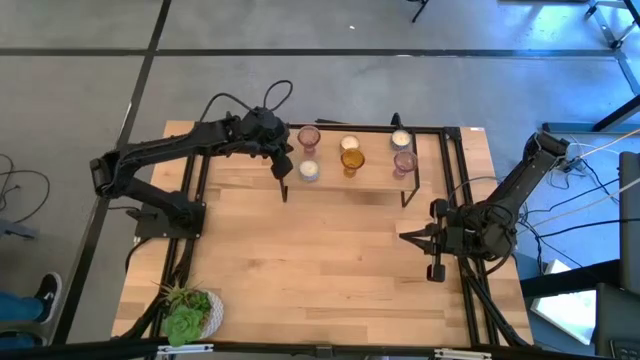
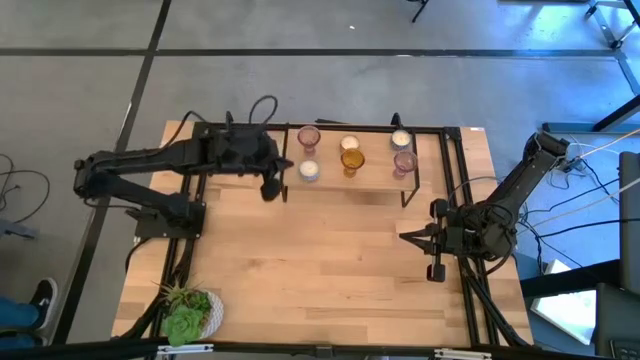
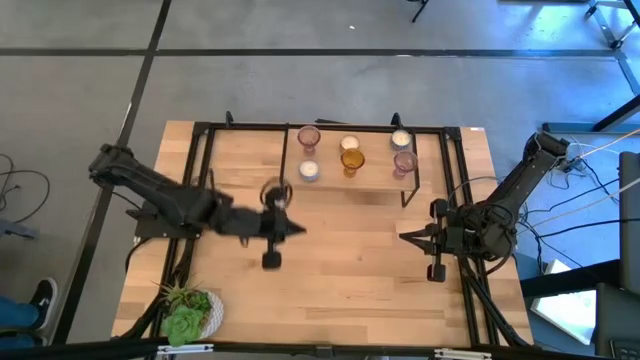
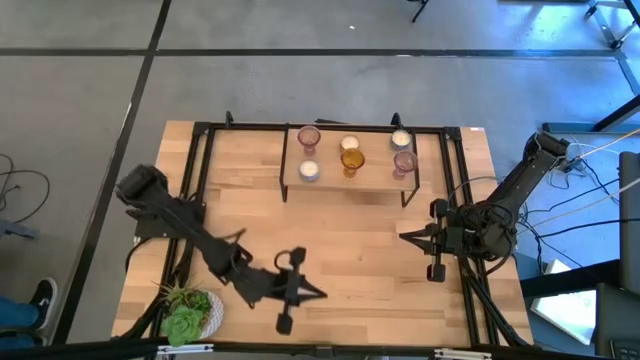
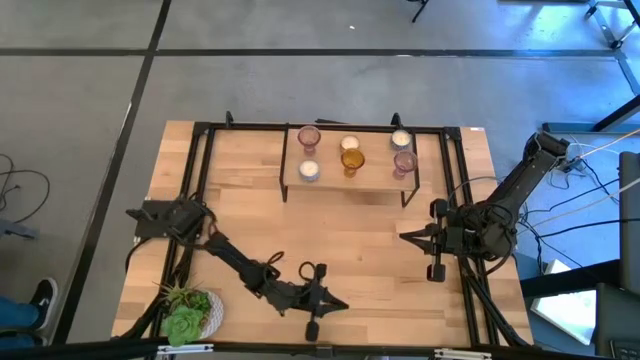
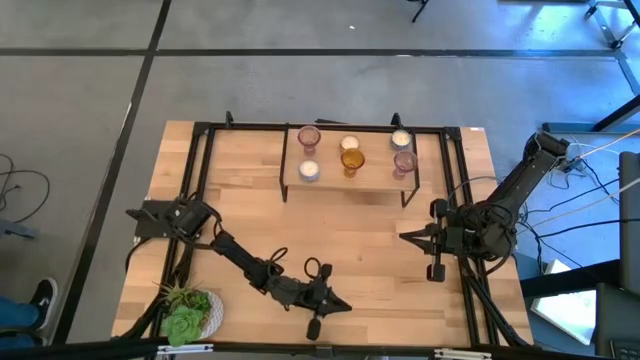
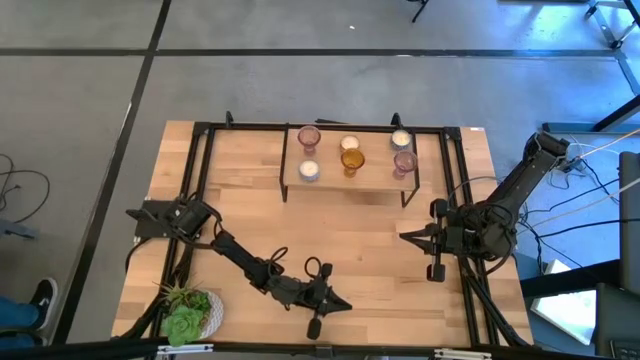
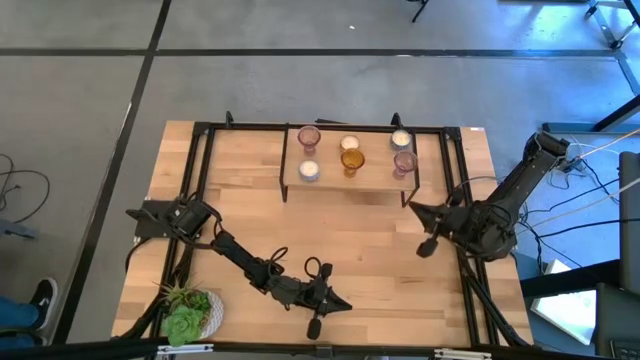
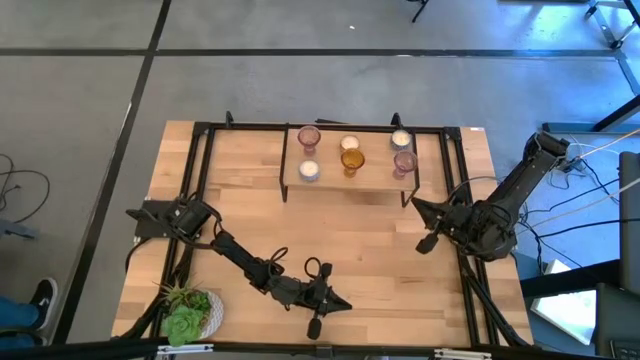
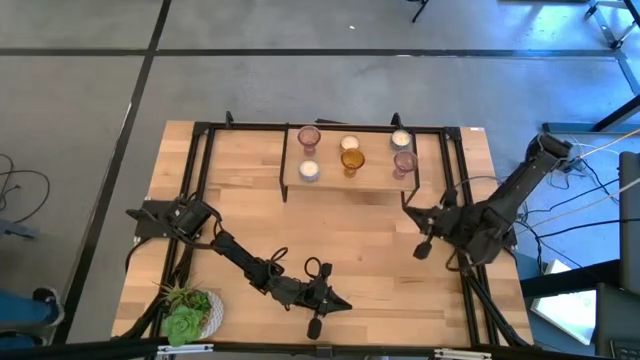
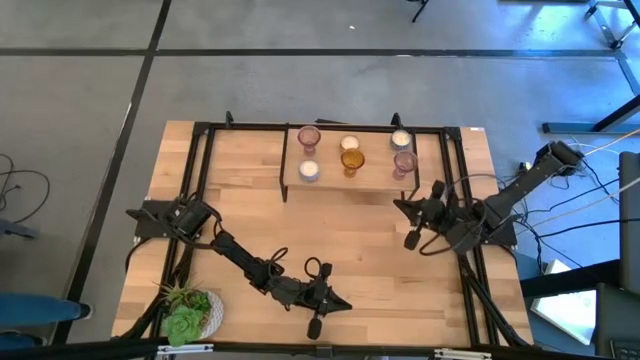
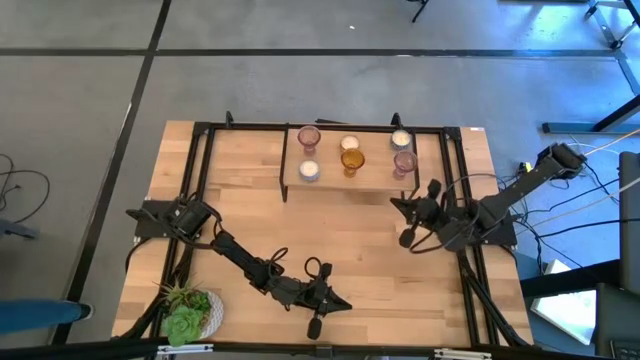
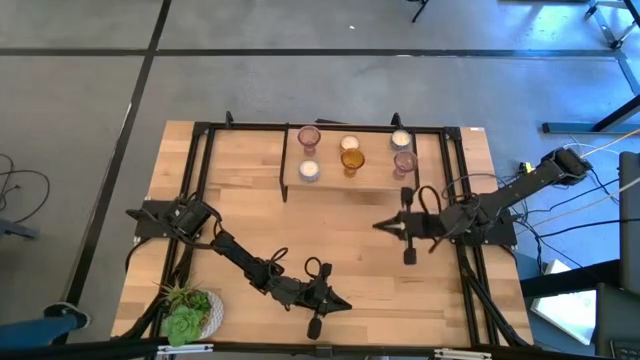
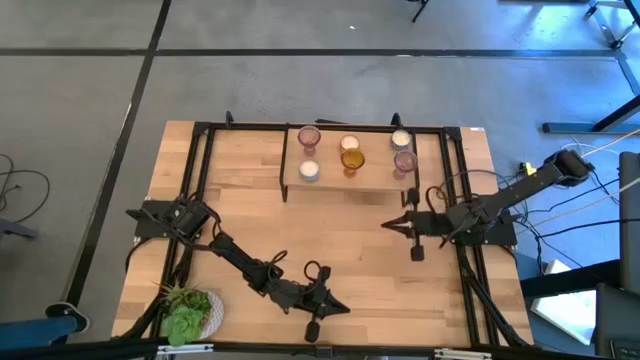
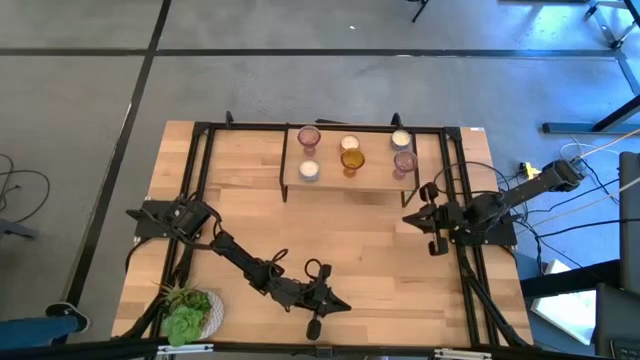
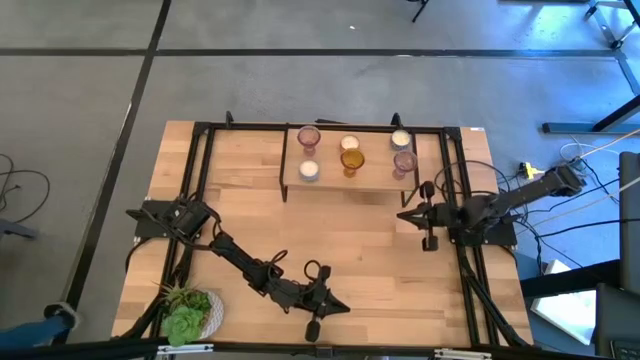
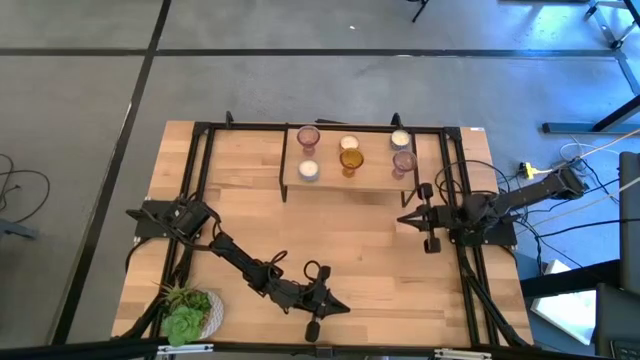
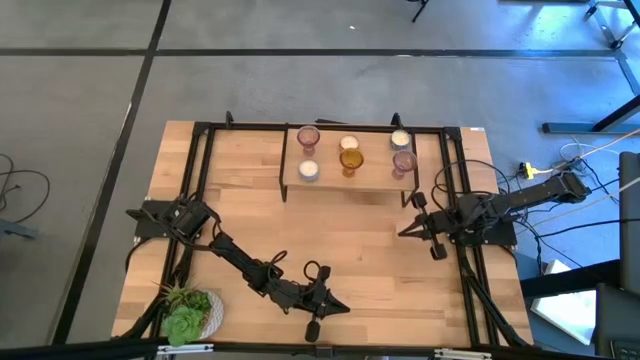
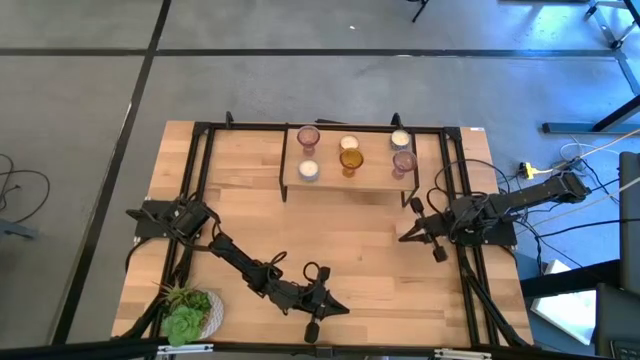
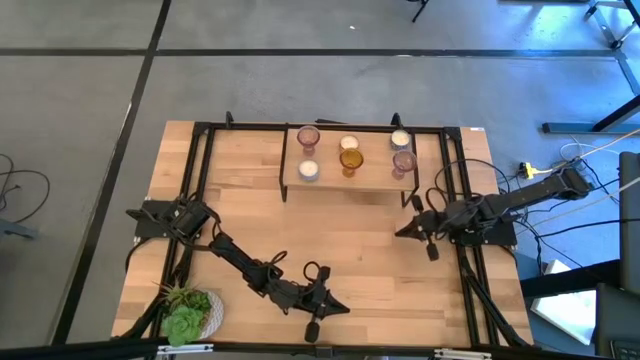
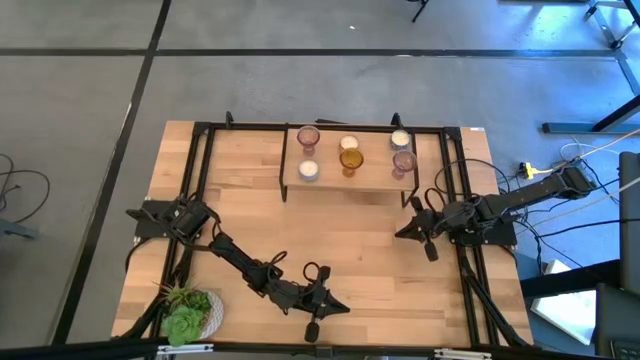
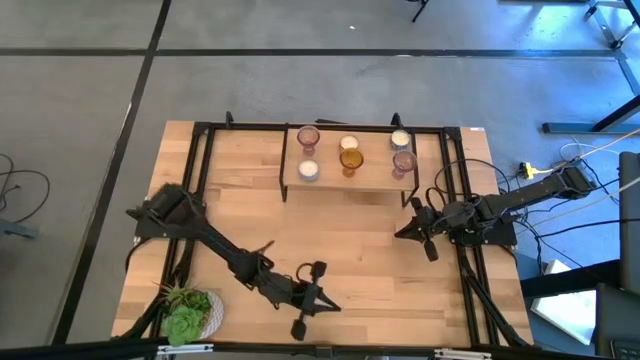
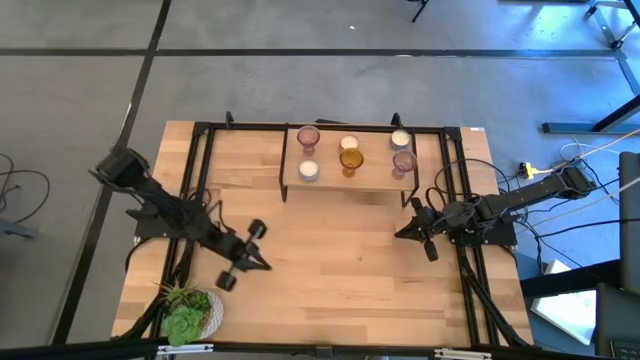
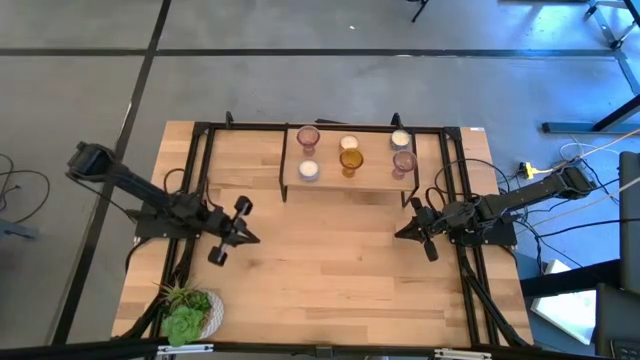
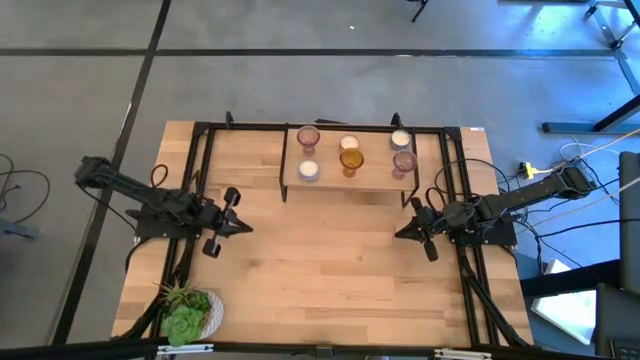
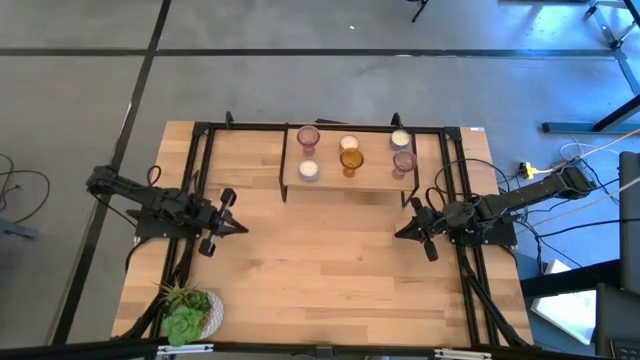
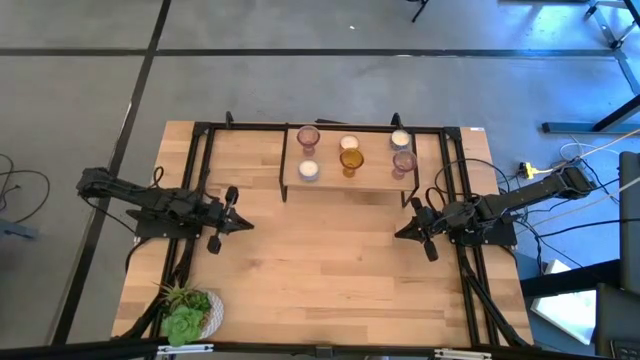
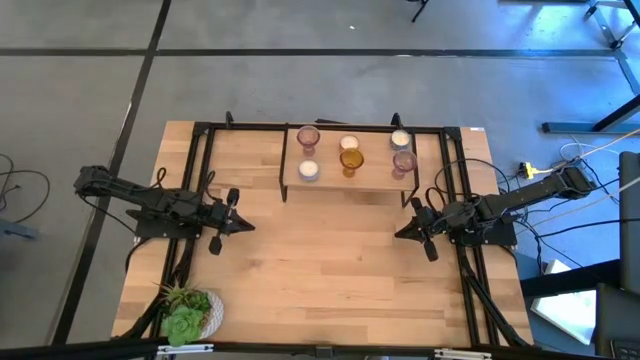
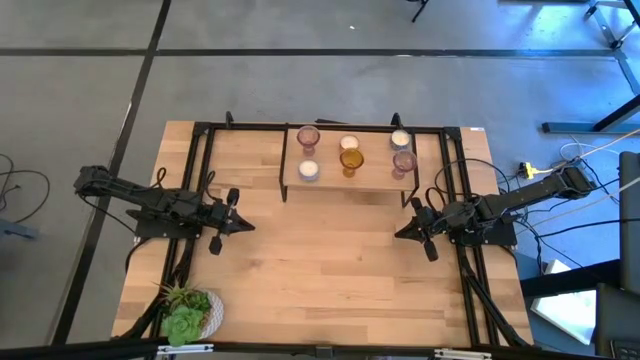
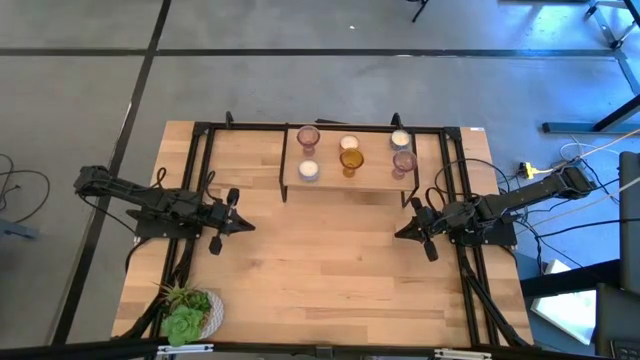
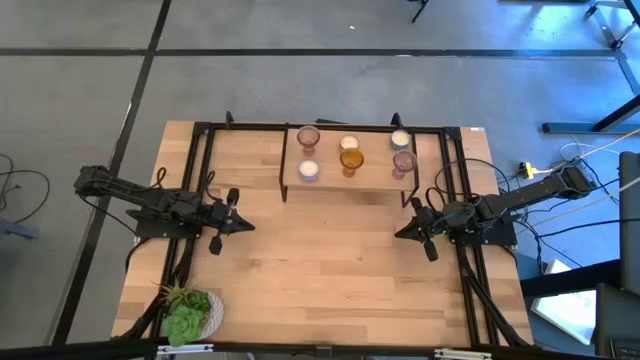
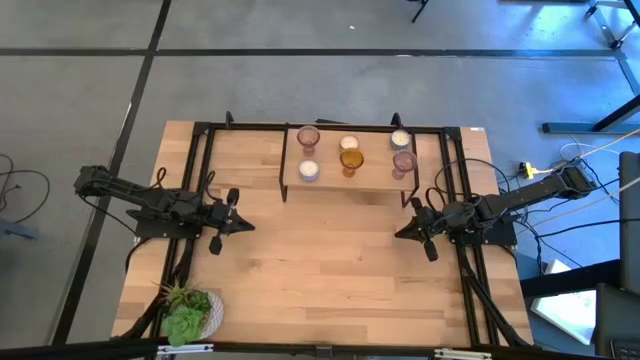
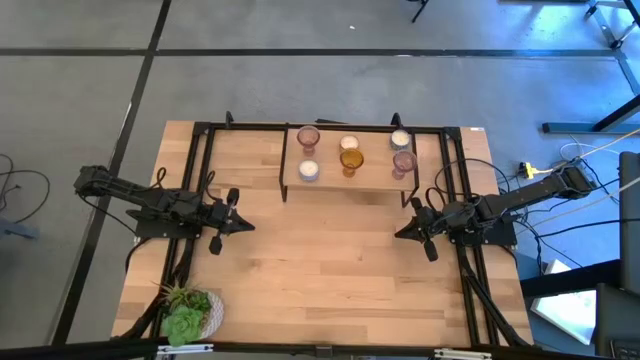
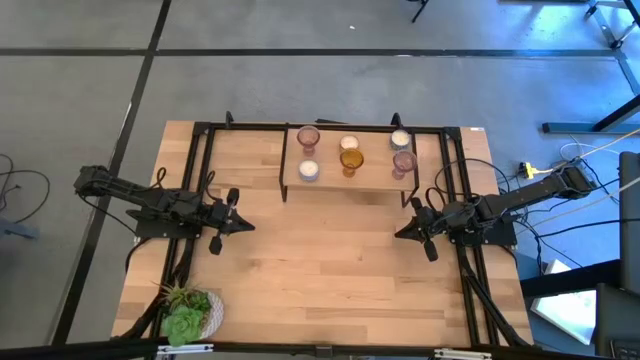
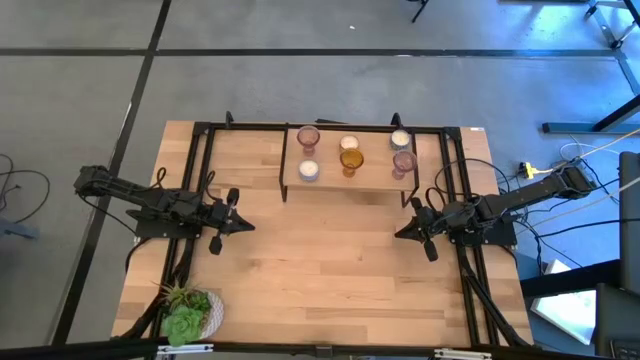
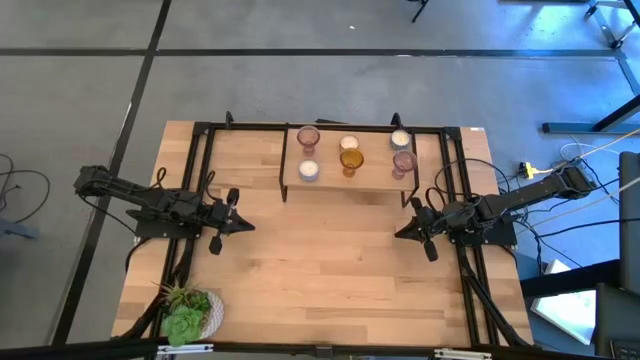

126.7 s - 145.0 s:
Task: Pick & Place candle stick holders
Return to Home Position
